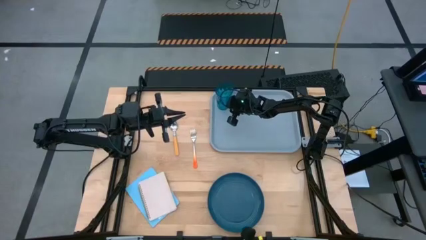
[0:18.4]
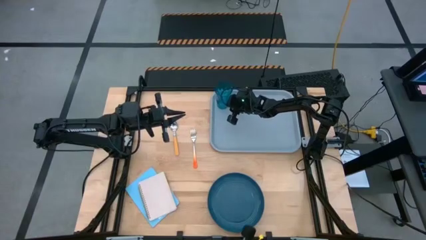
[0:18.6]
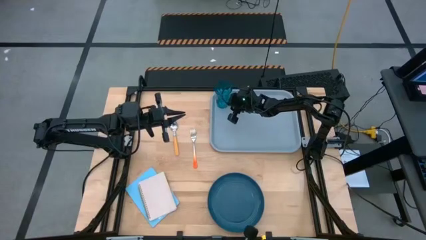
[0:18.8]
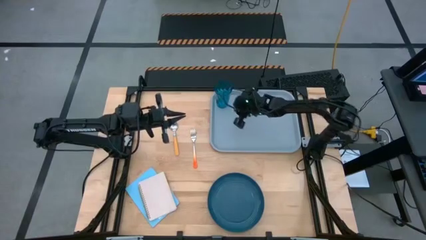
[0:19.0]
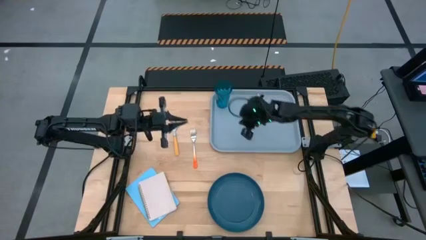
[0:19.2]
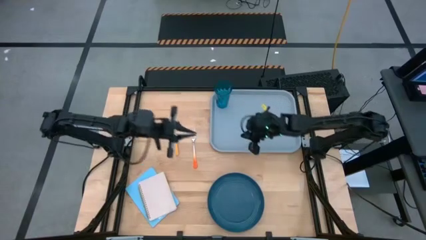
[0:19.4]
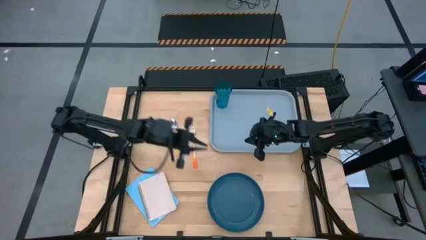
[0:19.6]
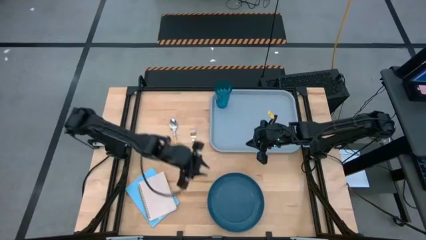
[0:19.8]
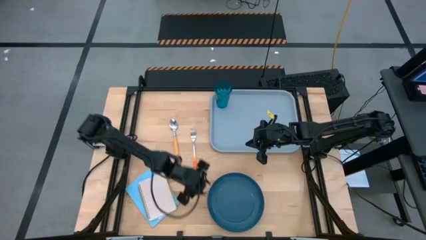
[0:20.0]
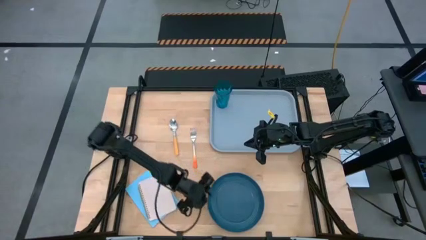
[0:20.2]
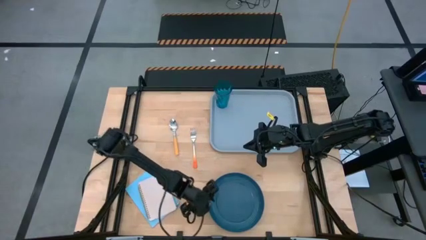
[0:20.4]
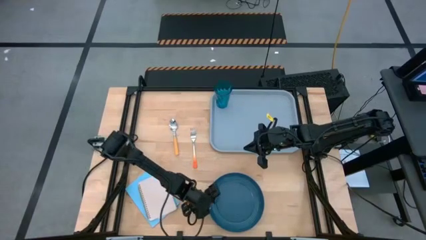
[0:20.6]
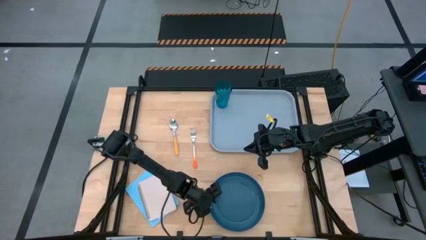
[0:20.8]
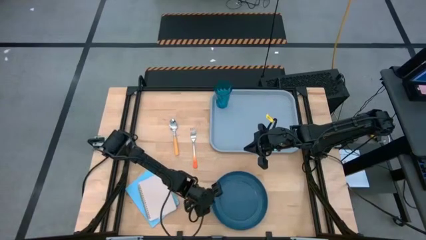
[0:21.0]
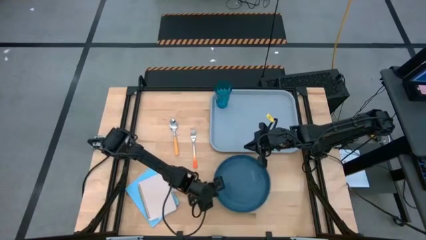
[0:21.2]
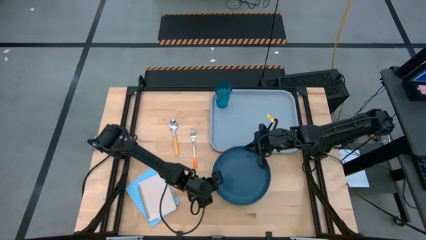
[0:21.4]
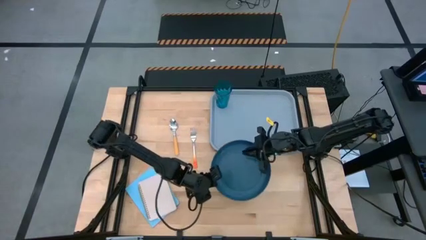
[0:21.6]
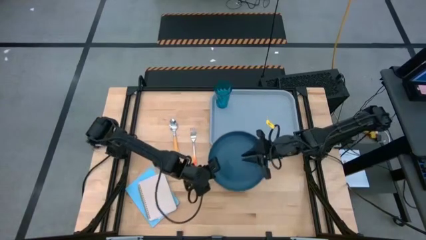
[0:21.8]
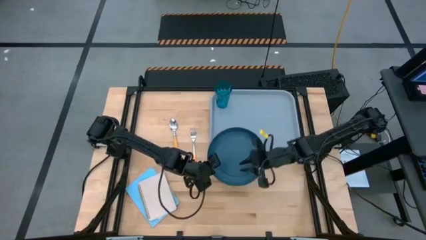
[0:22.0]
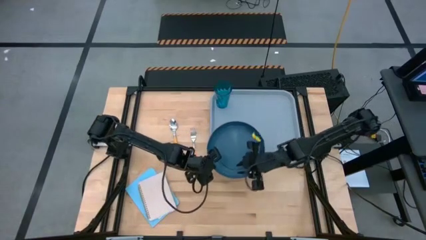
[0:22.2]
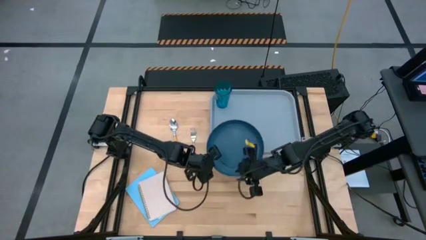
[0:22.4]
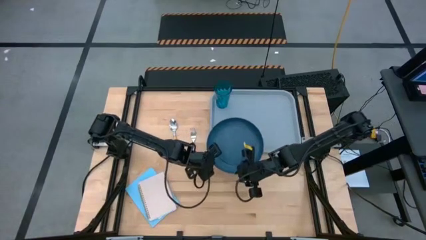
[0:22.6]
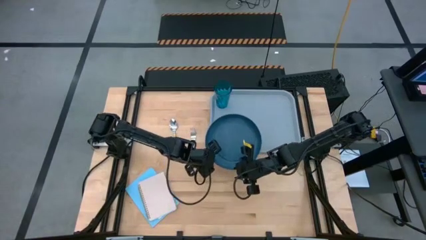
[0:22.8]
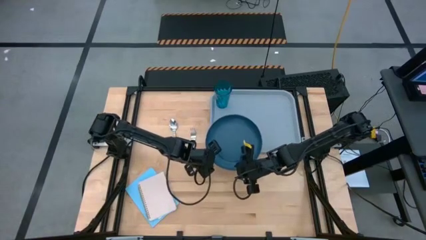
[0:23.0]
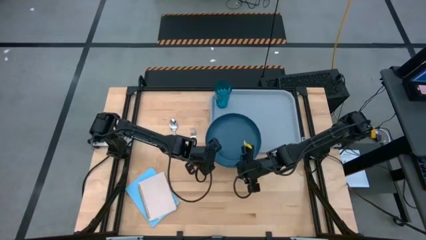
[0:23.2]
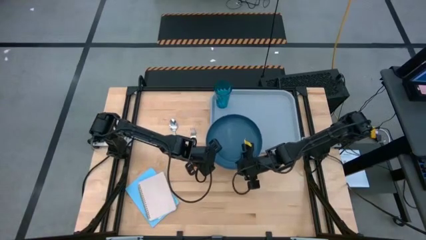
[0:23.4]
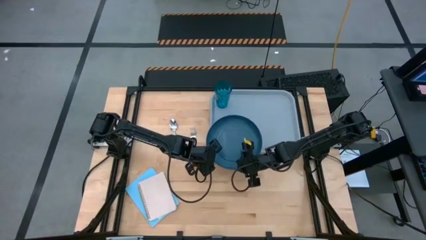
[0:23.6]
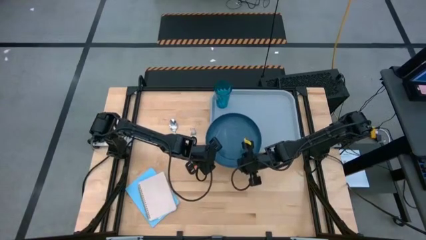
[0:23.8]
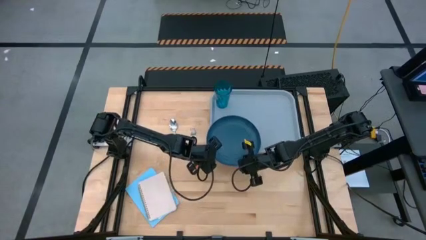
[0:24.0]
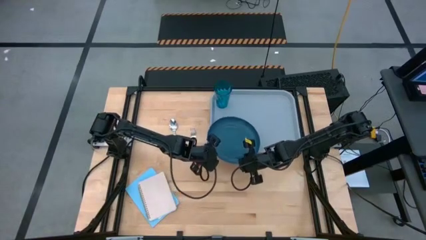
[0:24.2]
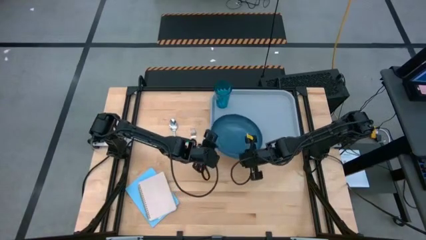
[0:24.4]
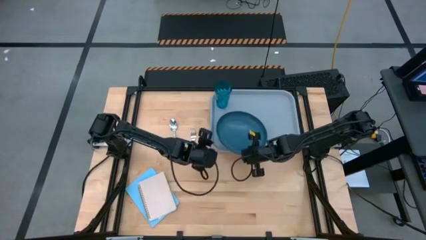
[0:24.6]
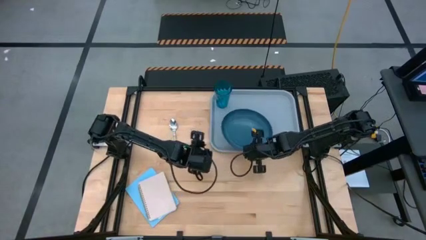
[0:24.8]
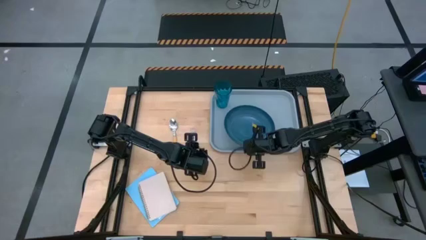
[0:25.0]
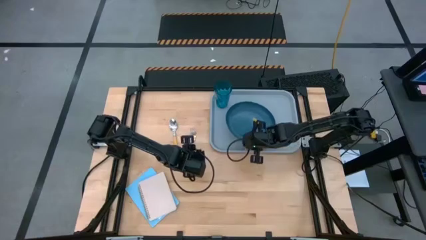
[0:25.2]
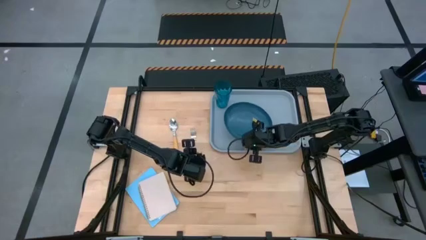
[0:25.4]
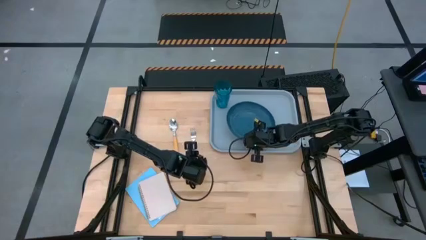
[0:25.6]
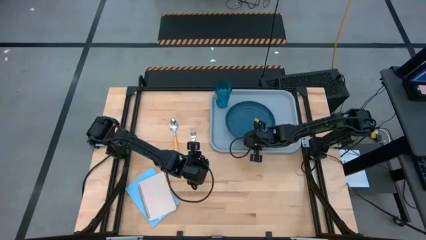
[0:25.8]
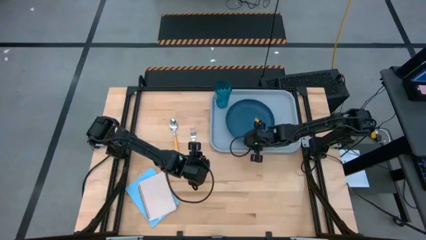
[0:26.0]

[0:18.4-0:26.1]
Task: Pick and place plate/cup/fork/spoon on tray
Put the blue plate on the gray tray

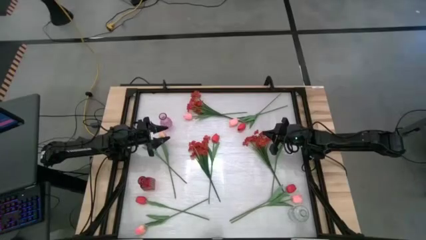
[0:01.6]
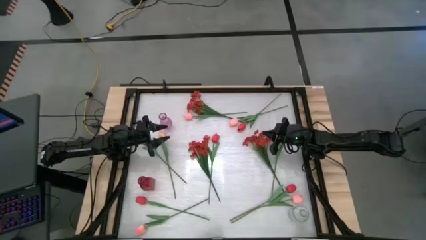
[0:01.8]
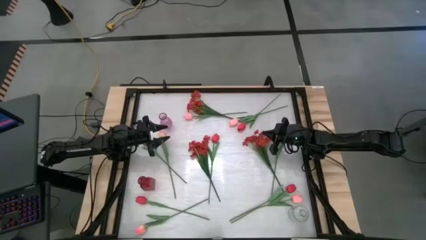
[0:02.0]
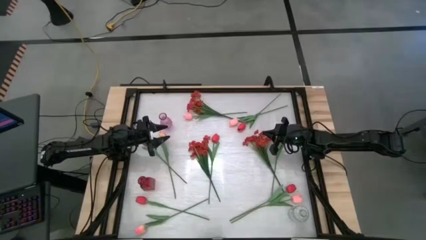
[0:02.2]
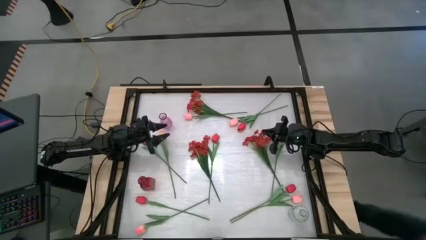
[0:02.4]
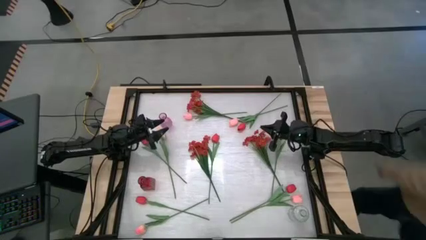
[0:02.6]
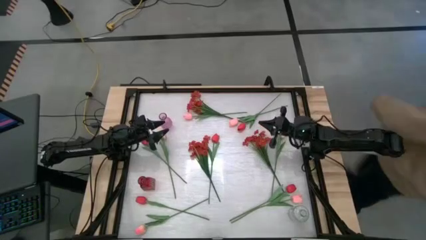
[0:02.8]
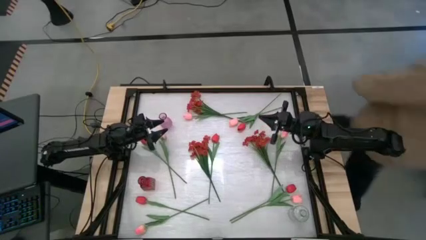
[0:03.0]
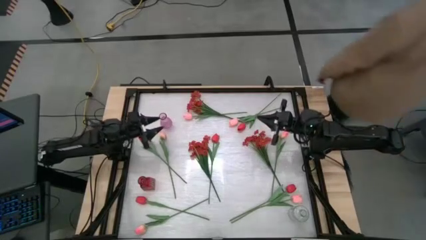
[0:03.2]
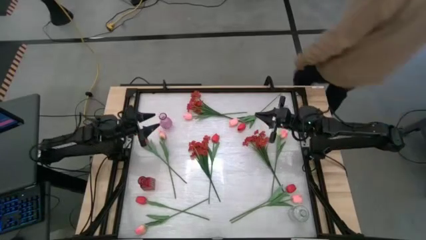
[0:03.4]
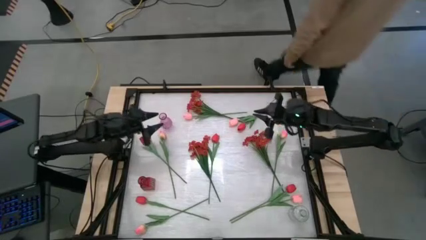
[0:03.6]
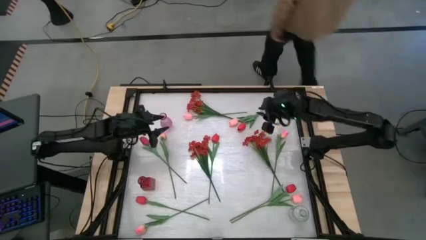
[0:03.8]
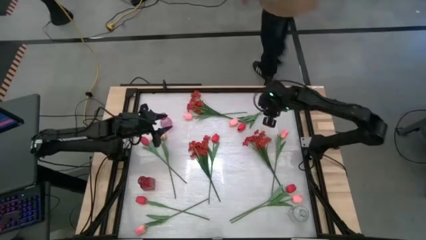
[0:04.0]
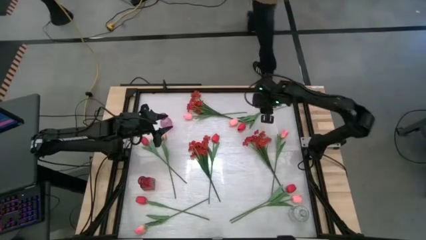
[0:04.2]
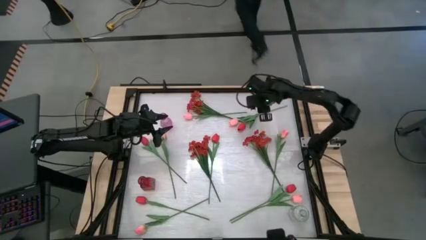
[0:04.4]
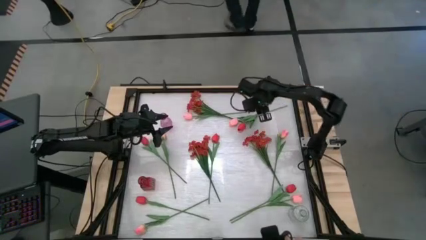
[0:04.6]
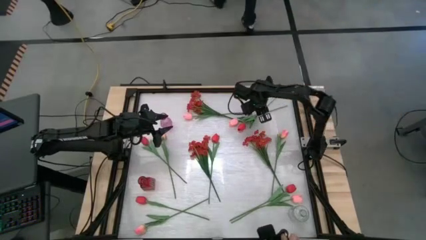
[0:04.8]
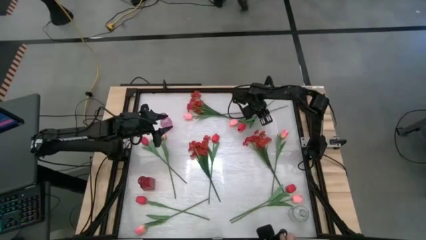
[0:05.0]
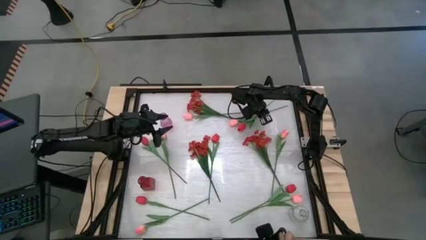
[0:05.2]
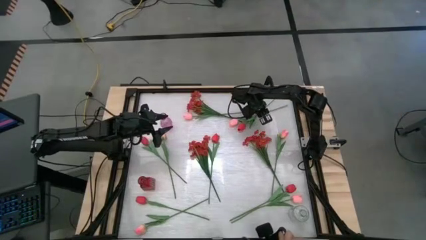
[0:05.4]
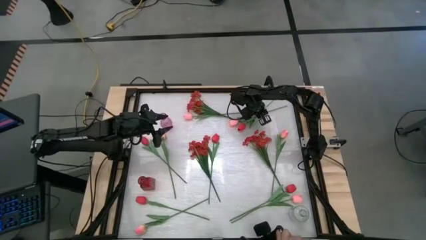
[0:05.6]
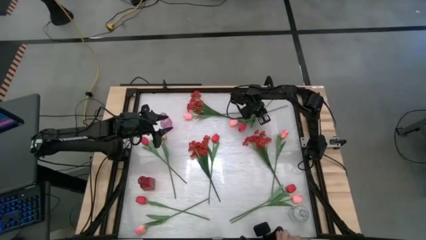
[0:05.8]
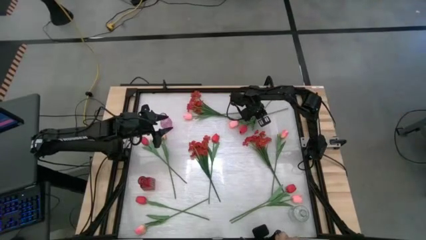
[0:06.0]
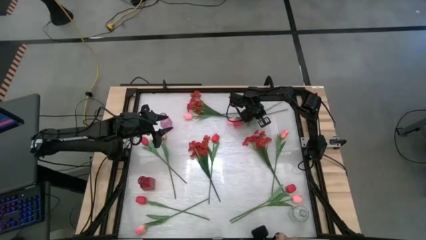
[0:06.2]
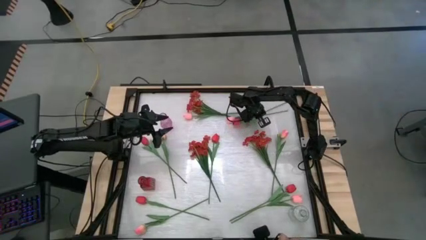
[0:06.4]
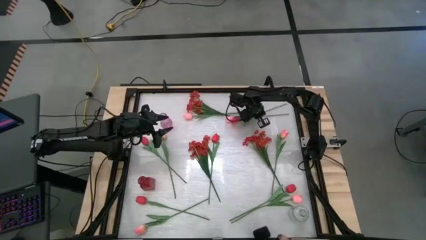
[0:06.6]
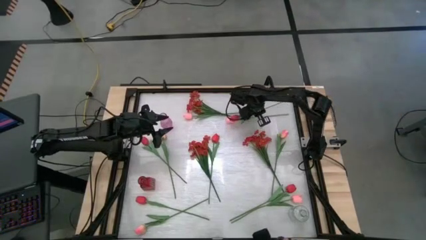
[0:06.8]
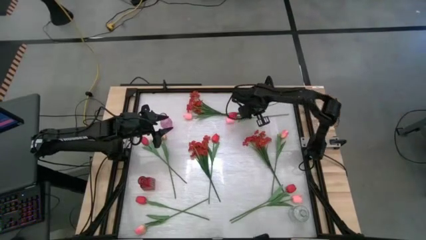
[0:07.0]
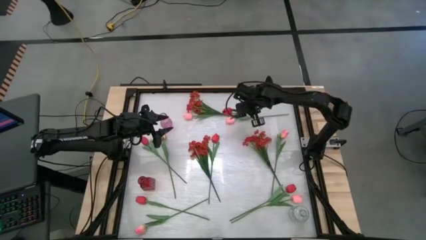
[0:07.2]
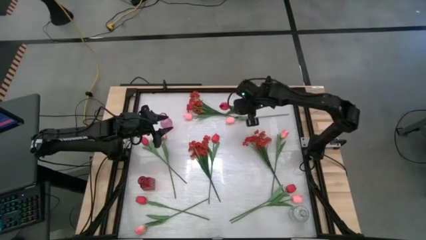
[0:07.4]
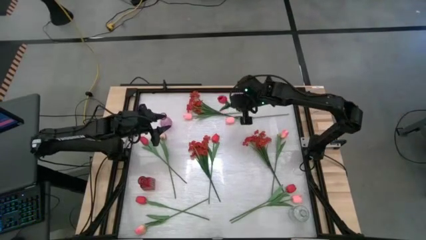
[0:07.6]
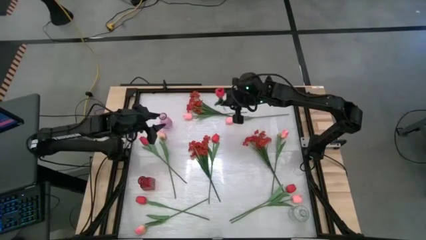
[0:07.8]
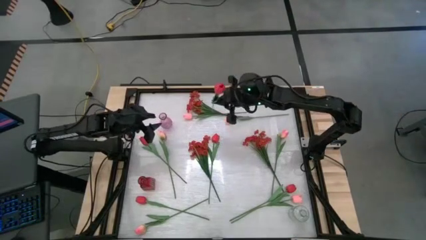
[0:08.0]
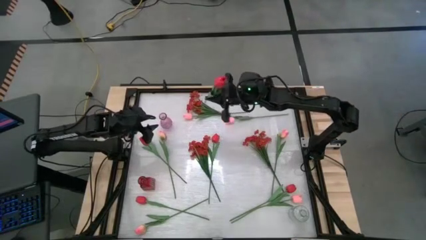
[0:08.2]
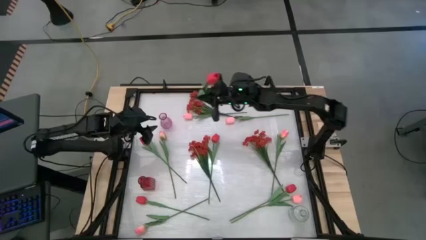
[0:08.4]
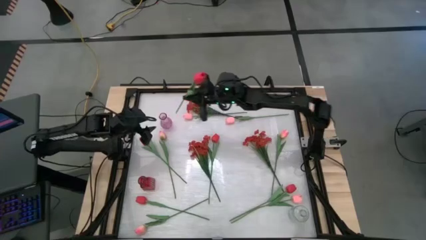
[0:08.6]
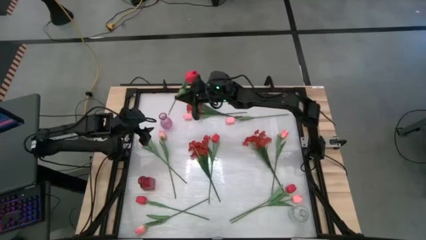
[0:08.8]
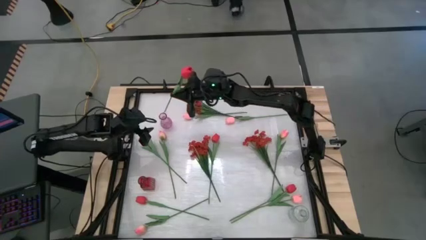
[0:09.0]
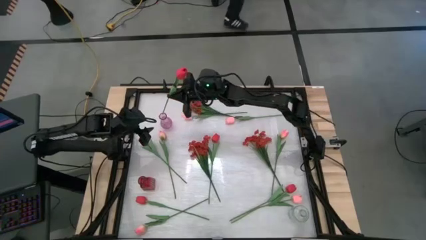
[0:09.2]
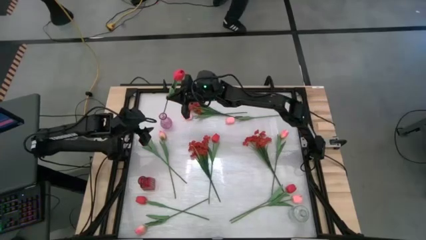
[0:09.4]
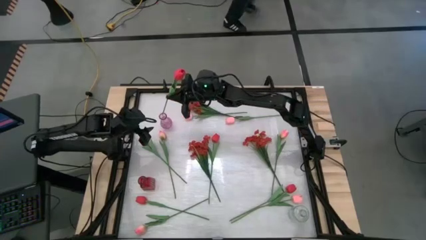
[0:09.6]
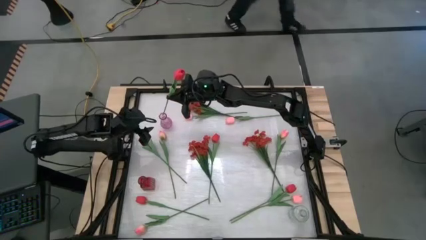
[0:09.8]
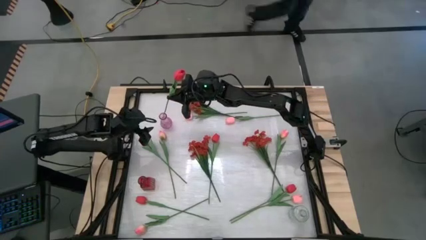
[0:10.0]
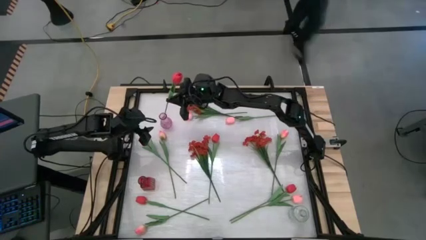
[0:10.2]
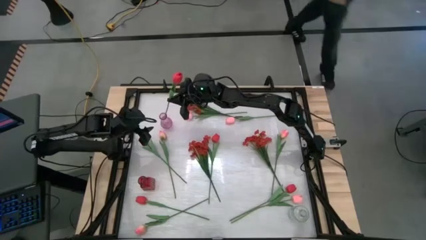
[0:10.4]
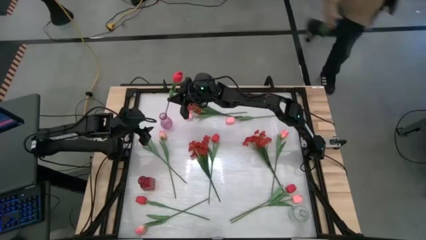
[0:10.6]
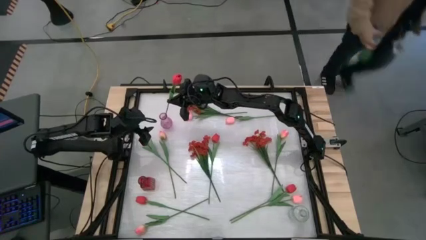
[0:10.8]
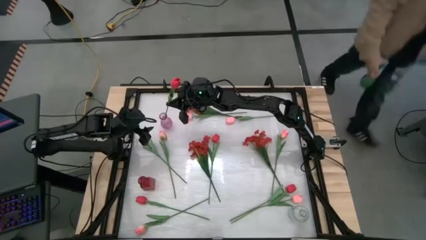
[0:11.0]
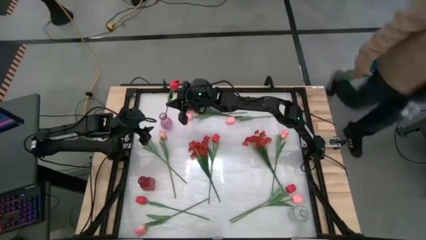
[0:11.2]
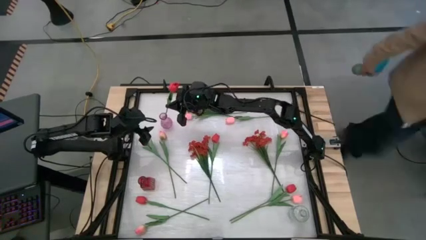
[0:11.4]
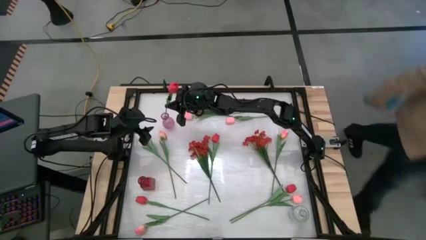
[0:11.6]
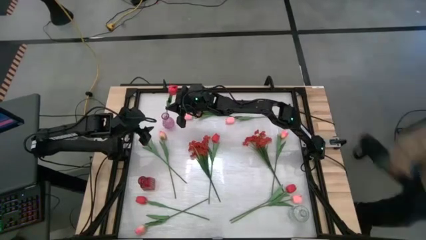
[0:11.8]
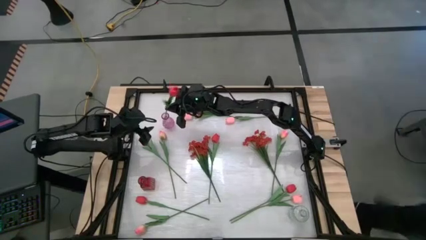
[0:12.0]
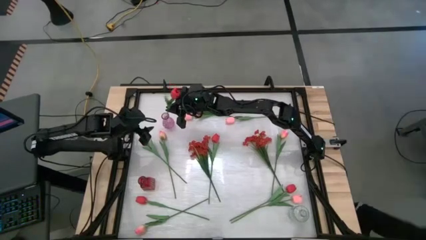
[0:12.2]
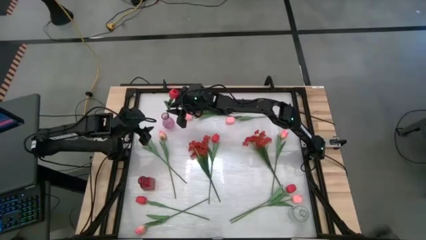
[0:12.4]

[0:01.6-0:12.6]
Task: Sort flowers into vase by color
Put the red tulip into the purple vase
